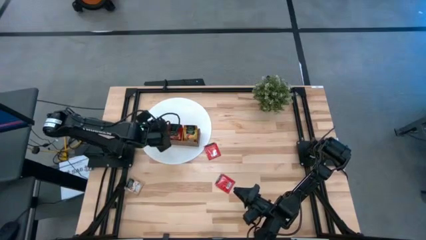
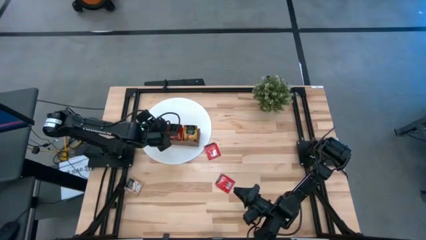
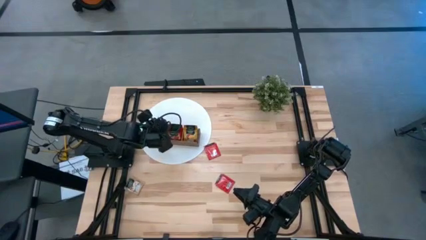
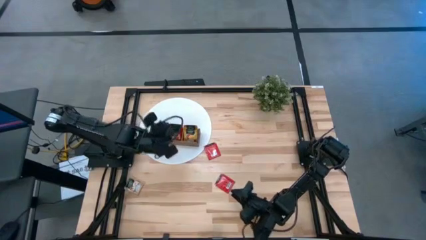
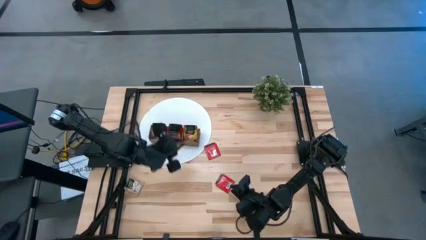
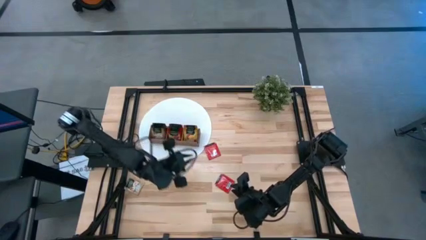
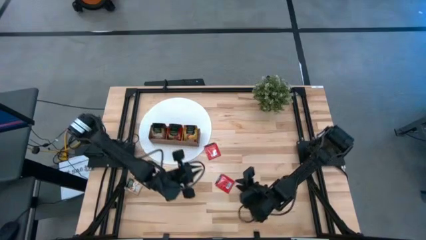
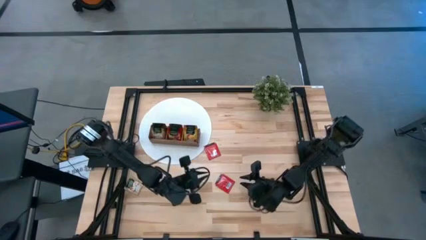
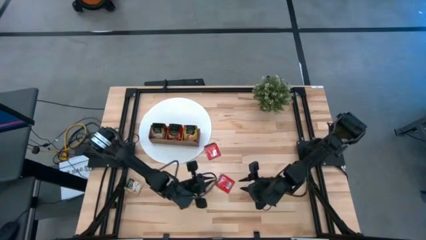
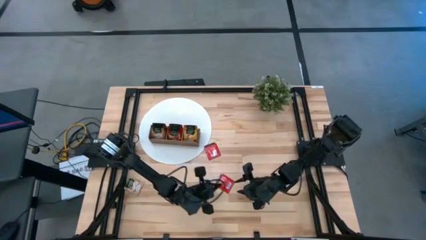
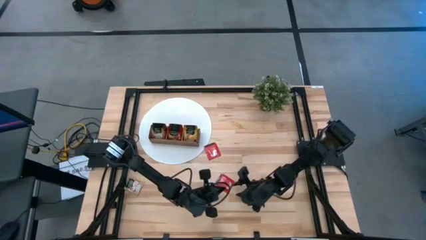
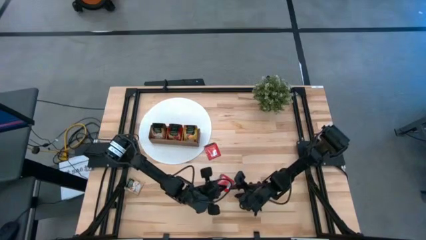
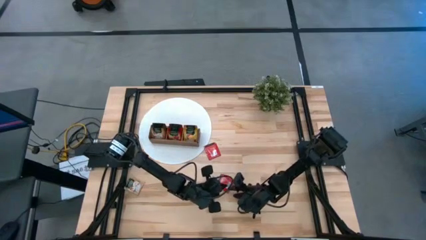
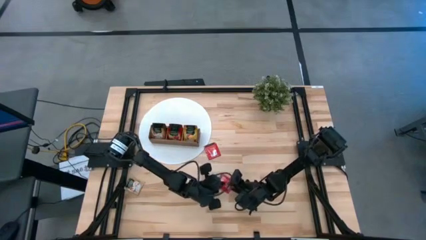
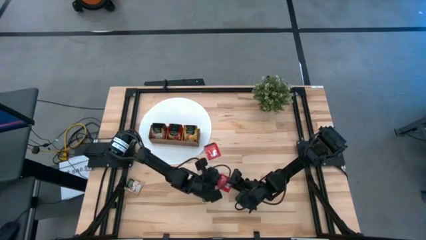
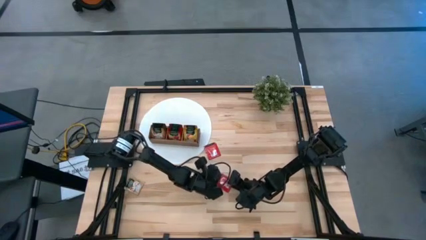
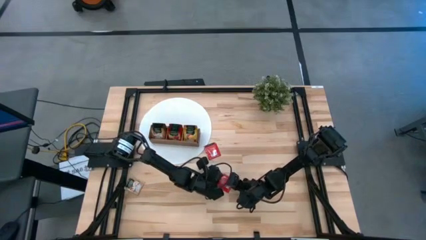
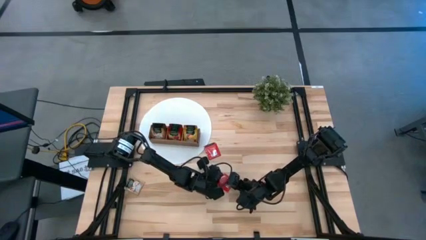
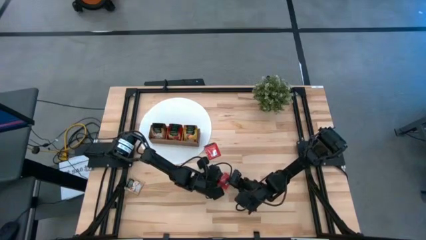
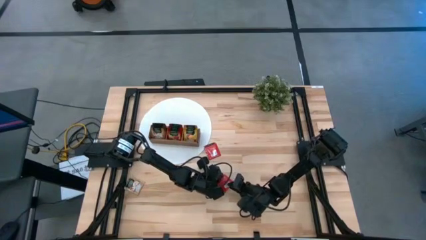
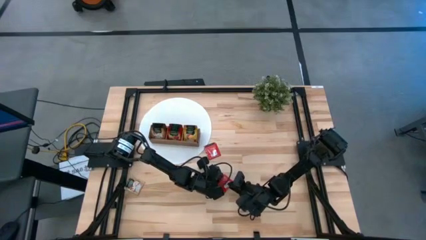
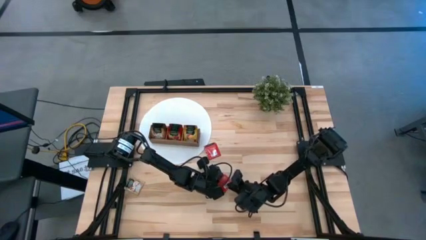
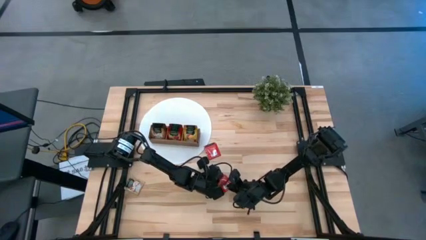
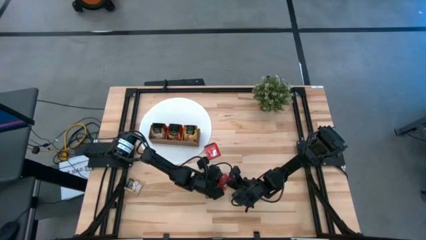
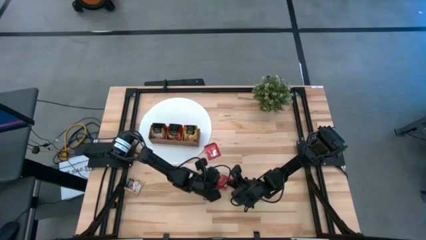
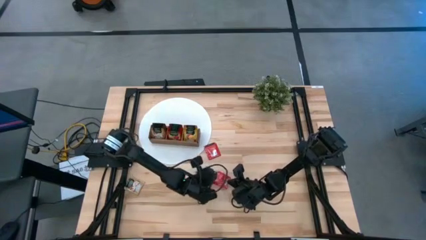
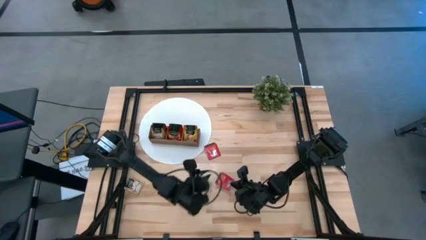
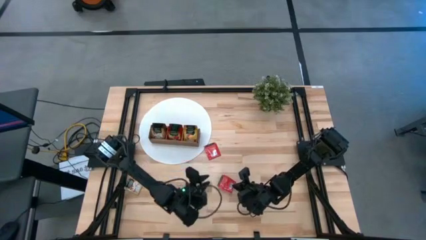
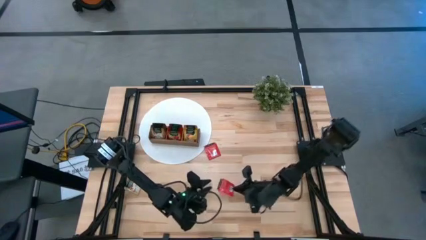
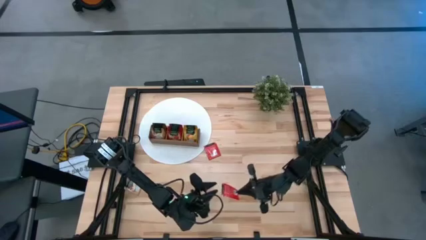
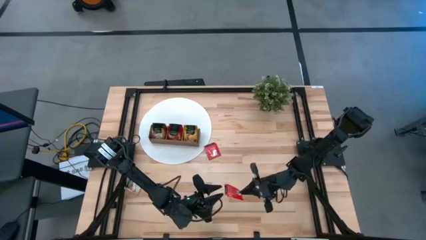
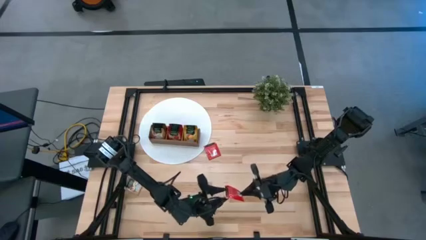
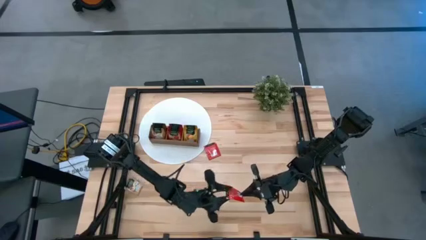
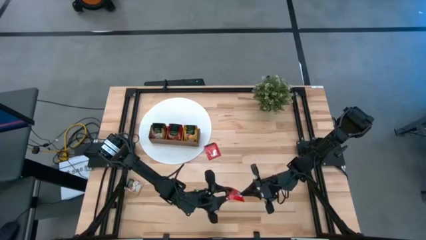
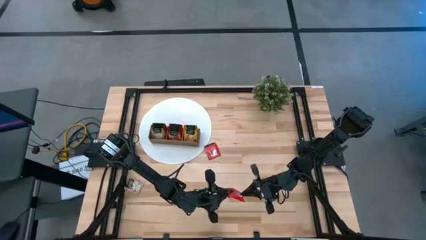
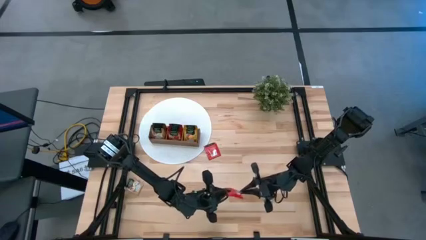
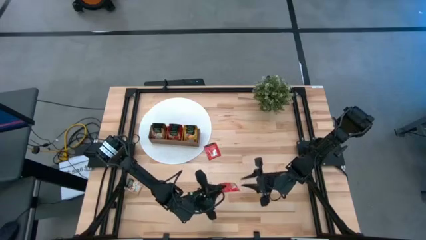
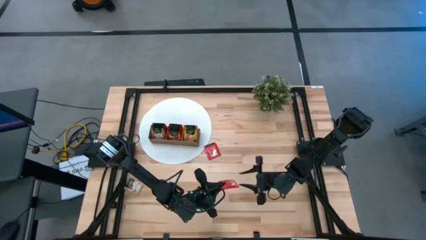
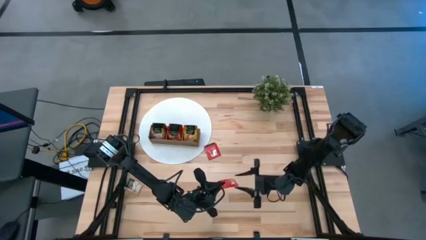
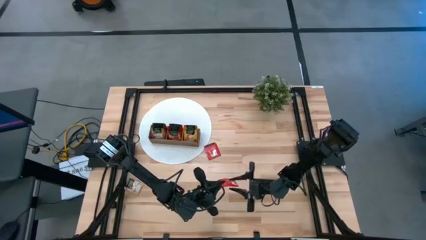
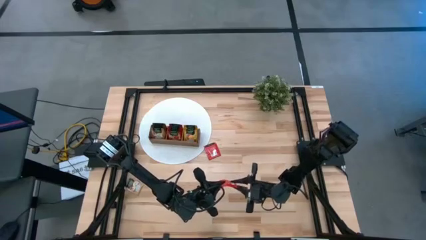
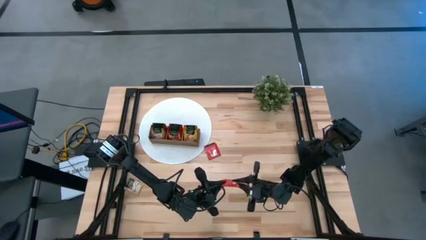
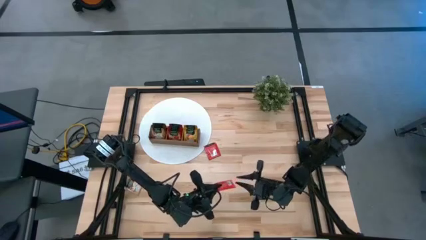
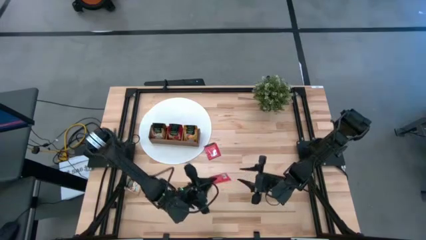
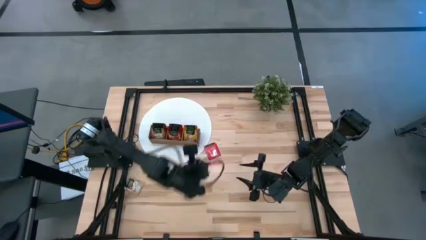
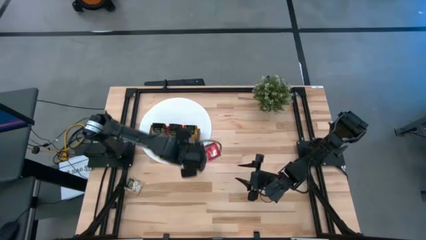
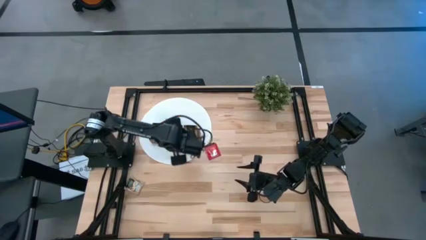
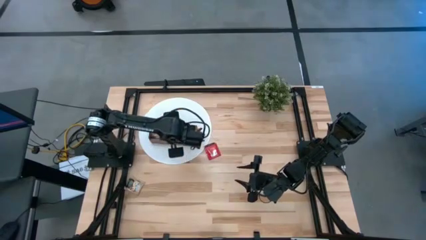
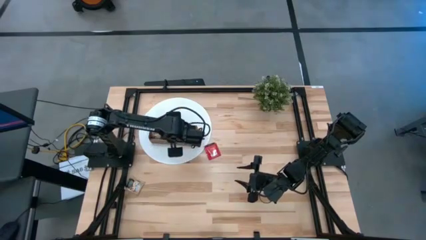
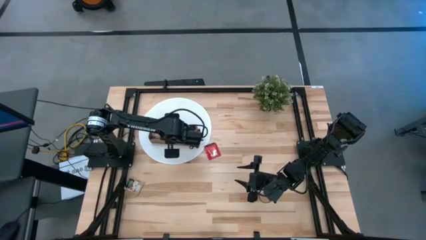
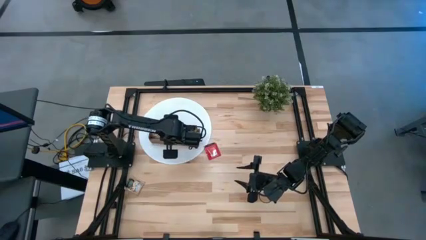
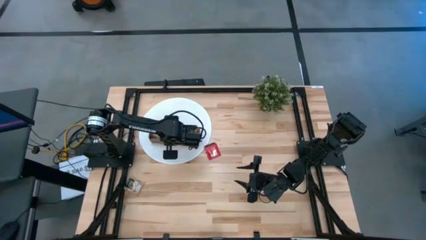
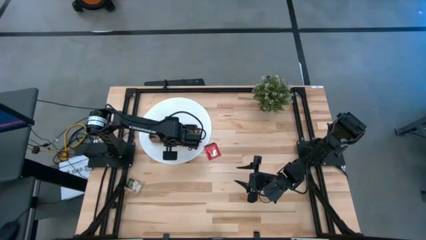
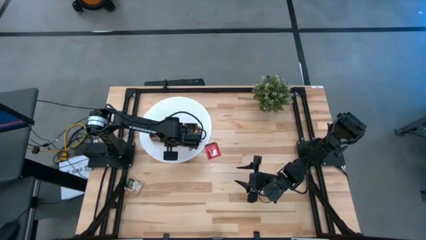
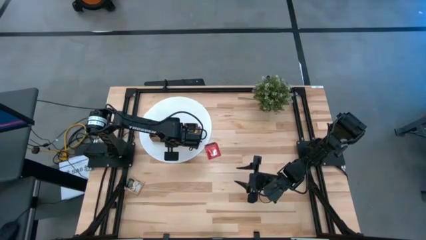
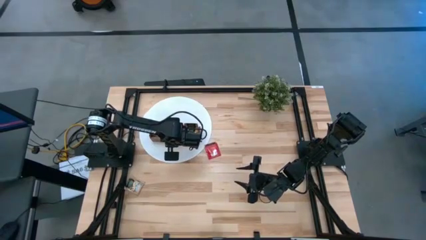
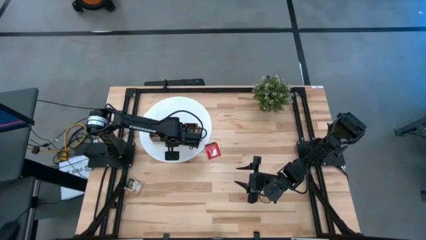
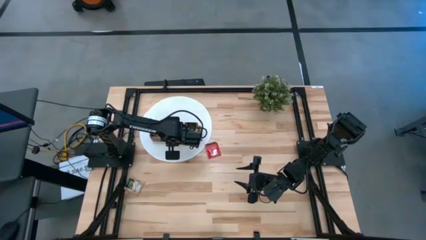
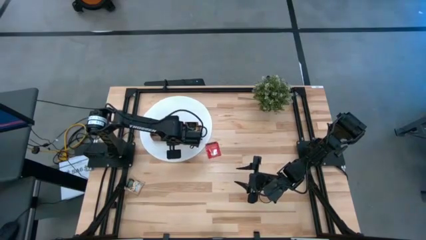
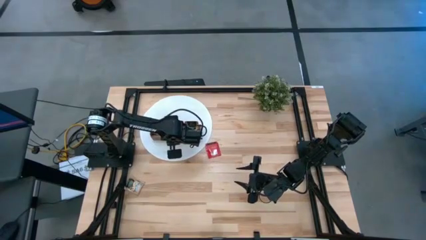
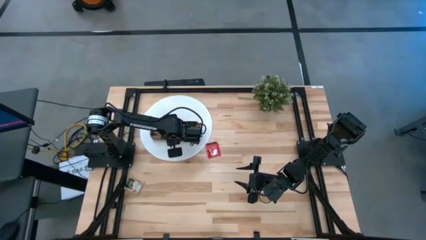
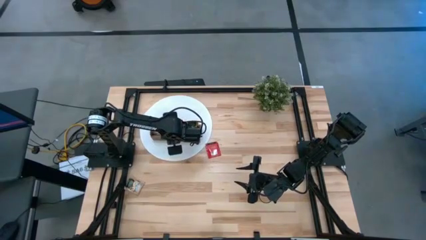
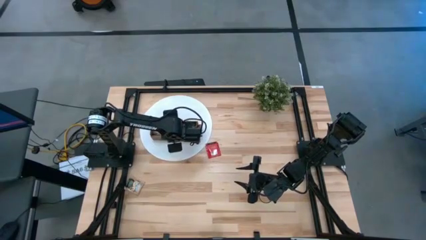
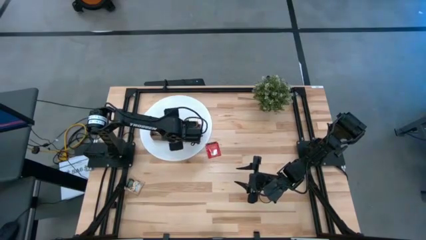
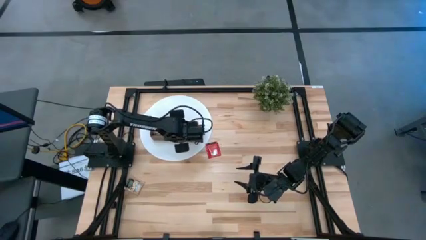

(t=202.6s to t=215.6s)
Task: Pick & Place Tea
Put the red tea bag into the middle section of the wooden organizer

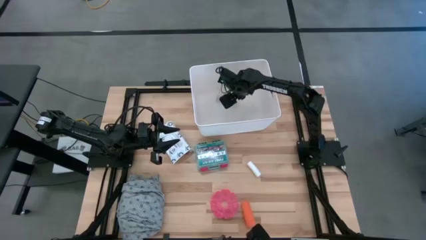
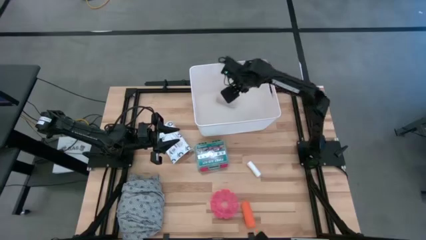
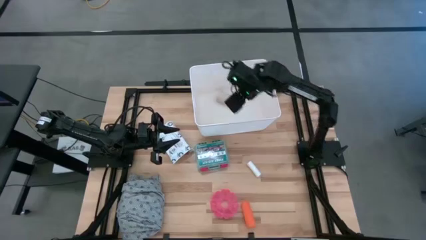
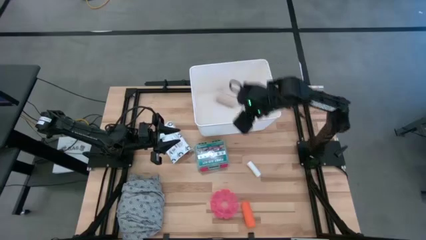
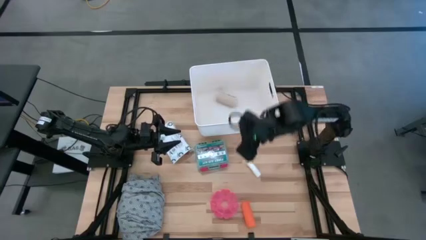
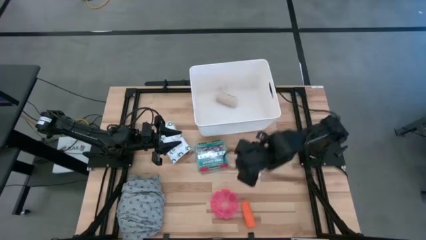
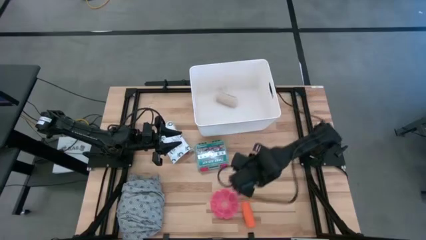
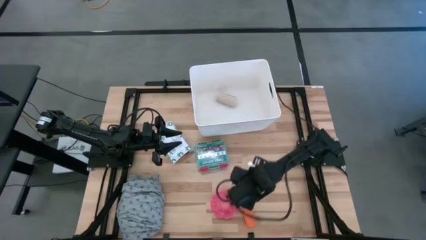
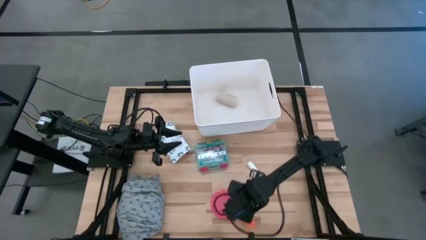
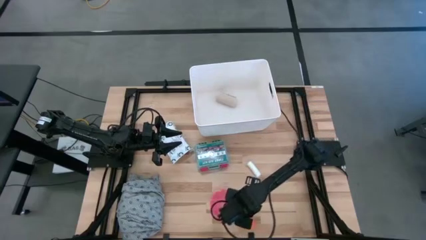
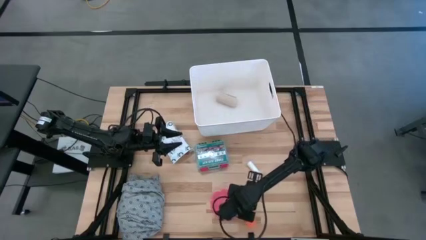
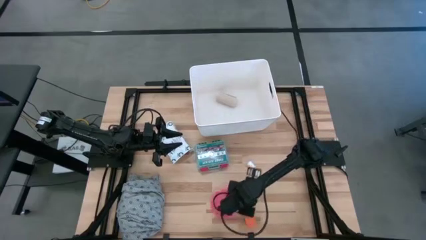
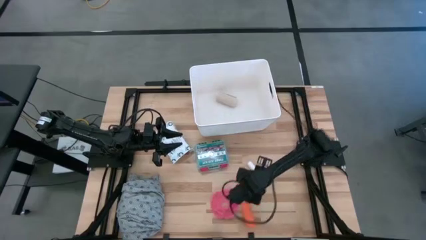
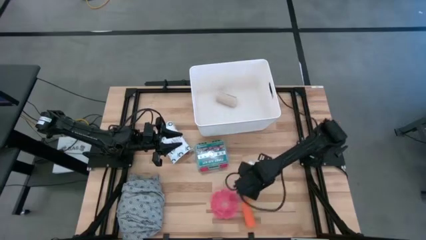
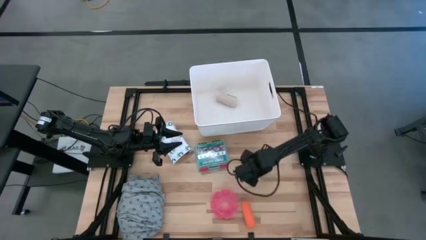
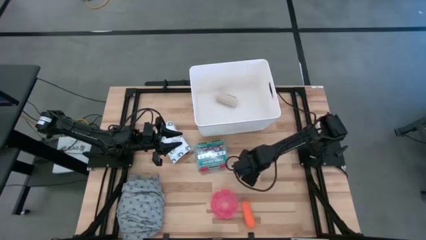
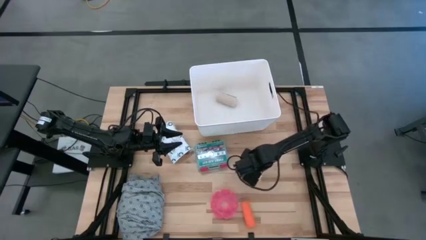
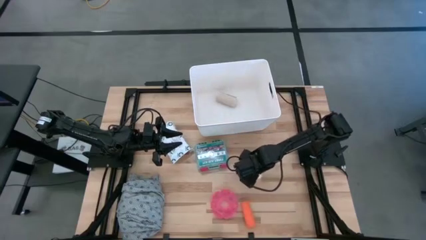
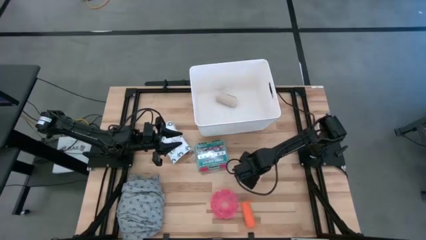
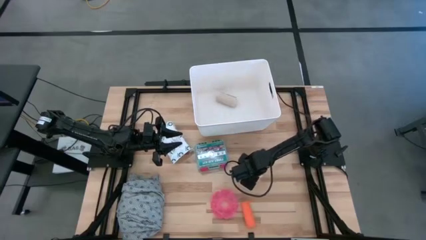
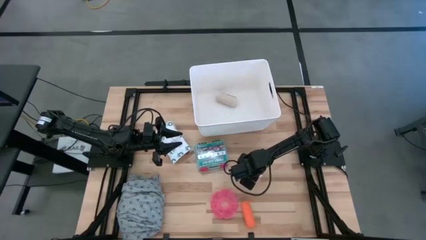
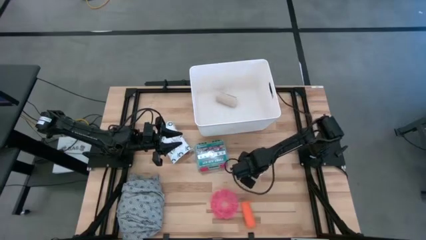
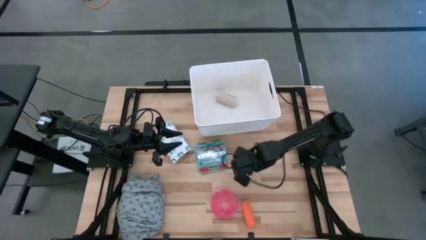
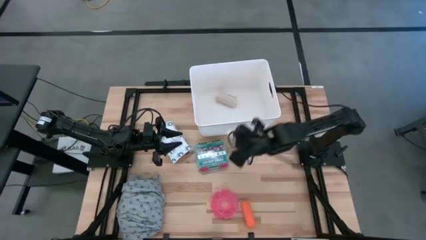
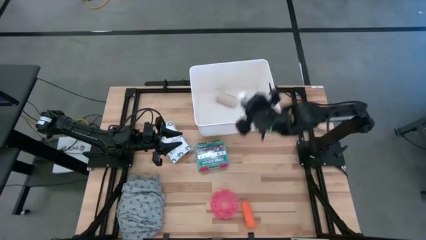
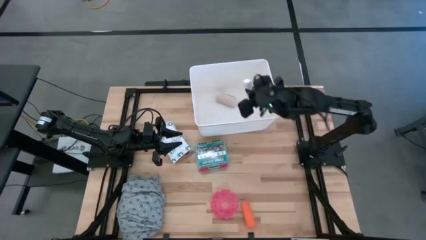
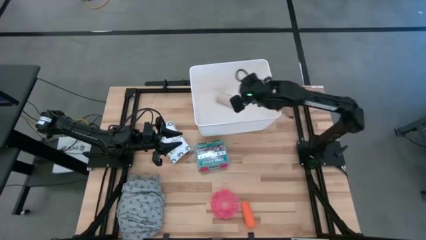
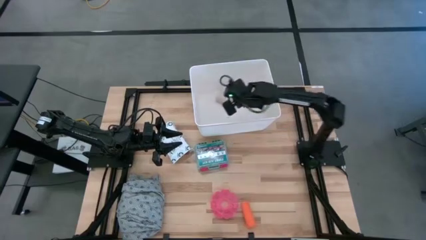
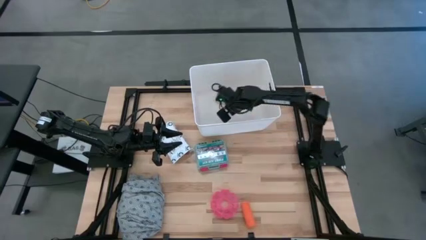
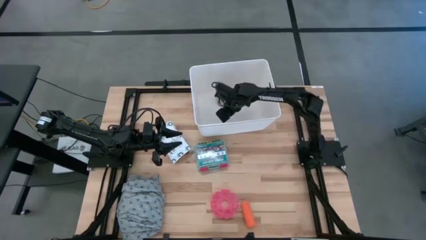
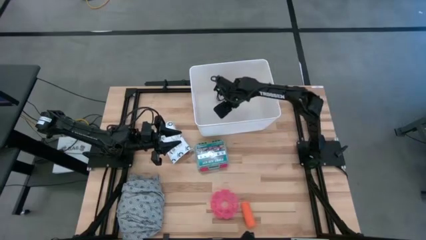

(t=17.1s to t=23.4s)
Task: Pick & place medical supplies in basket/bin
Put the white bandage into the white bin
